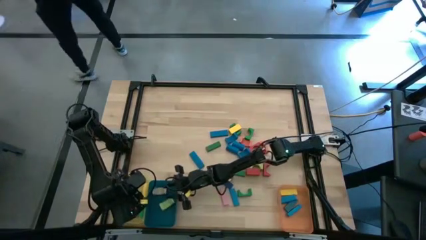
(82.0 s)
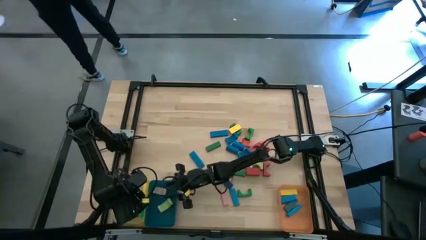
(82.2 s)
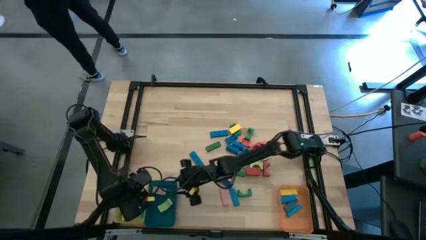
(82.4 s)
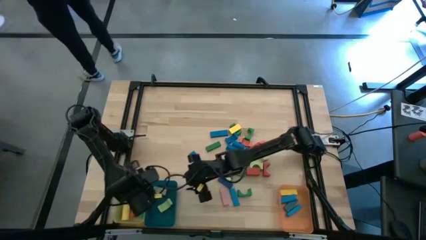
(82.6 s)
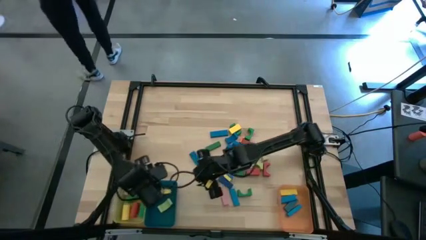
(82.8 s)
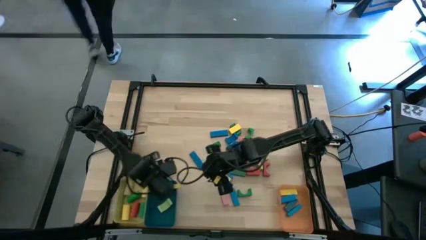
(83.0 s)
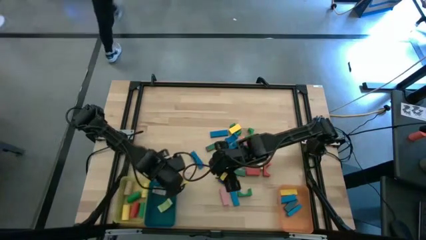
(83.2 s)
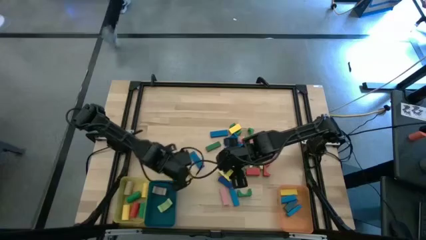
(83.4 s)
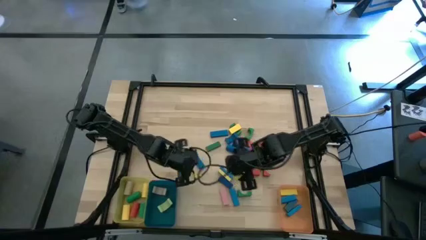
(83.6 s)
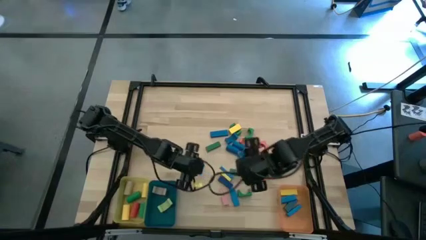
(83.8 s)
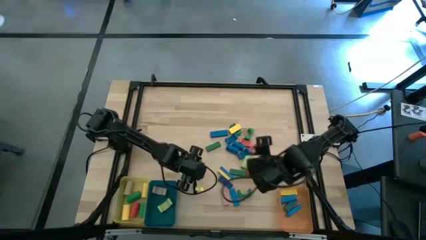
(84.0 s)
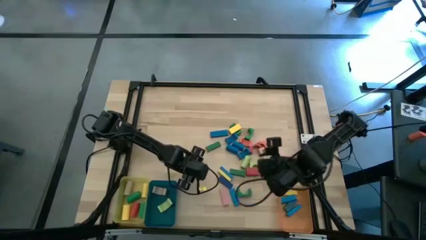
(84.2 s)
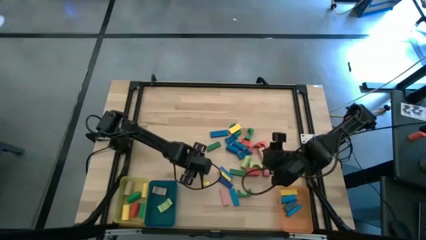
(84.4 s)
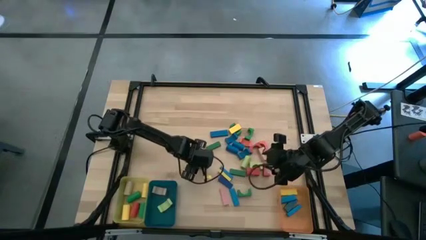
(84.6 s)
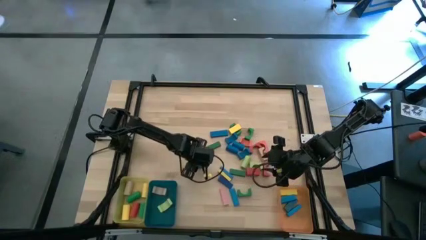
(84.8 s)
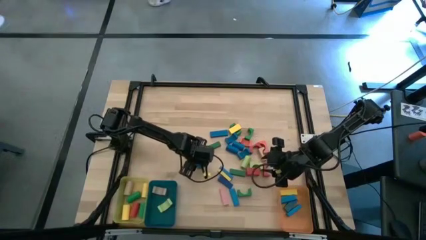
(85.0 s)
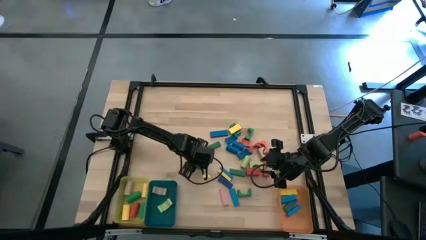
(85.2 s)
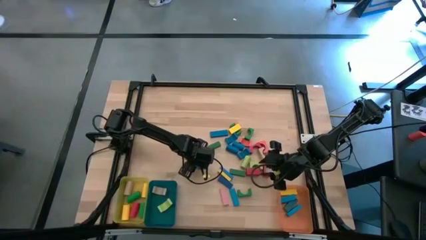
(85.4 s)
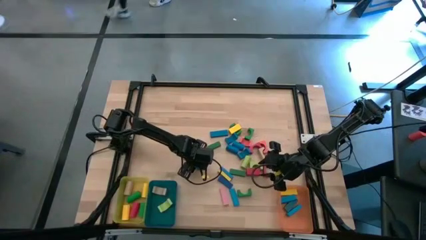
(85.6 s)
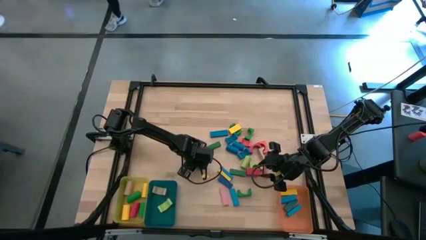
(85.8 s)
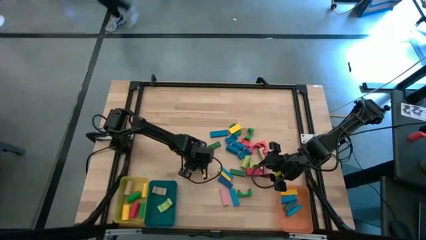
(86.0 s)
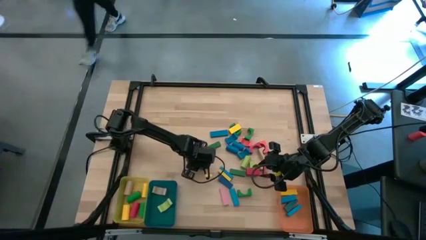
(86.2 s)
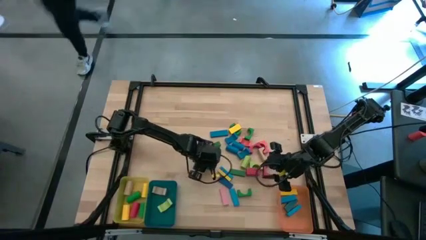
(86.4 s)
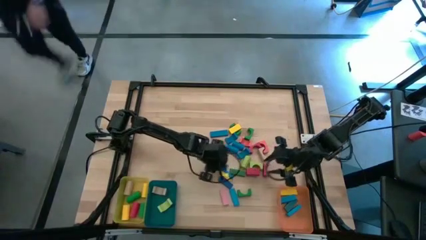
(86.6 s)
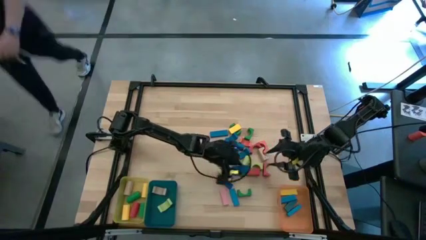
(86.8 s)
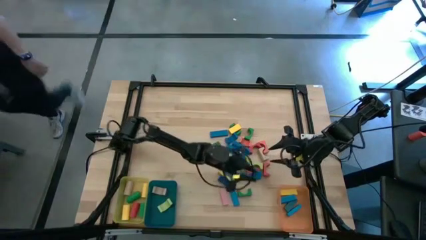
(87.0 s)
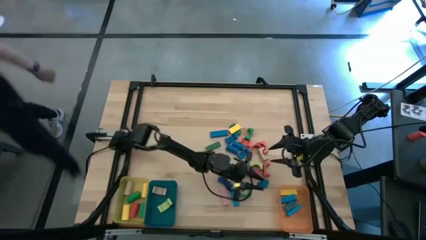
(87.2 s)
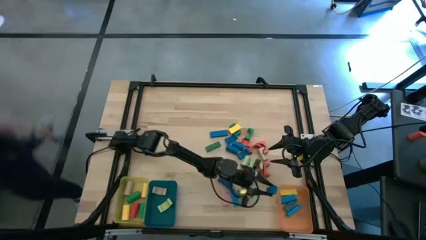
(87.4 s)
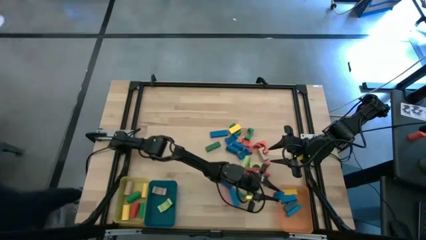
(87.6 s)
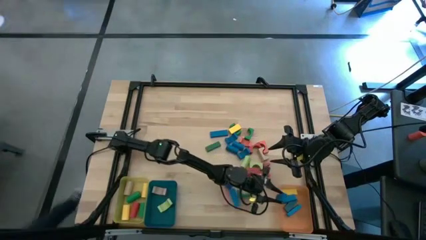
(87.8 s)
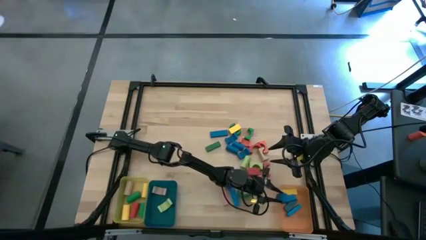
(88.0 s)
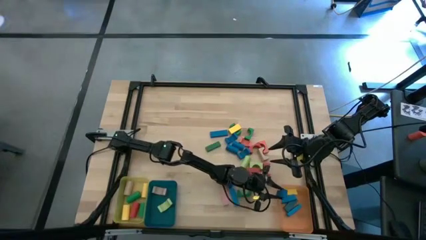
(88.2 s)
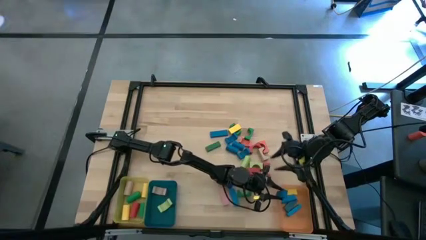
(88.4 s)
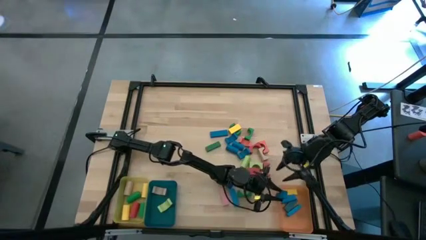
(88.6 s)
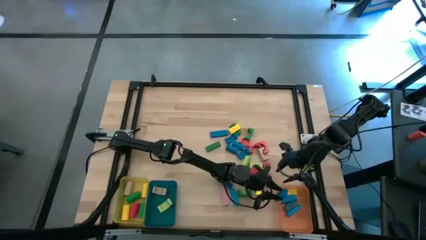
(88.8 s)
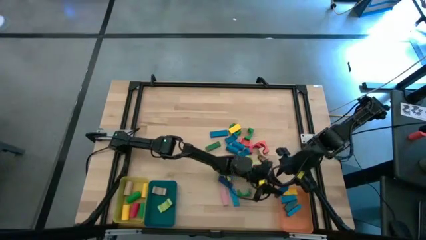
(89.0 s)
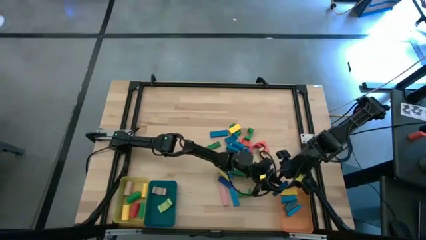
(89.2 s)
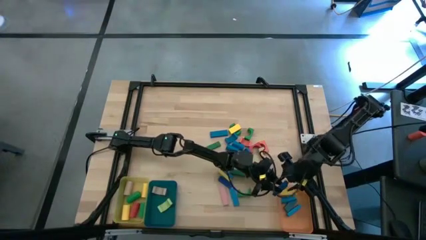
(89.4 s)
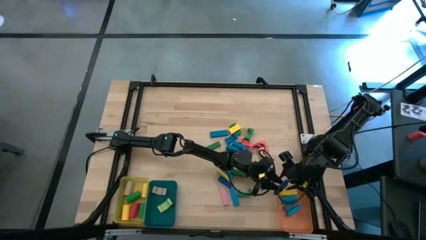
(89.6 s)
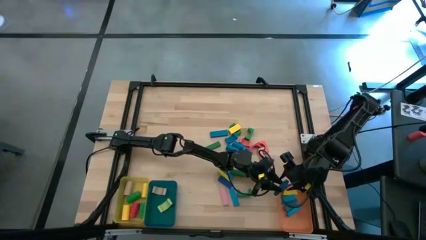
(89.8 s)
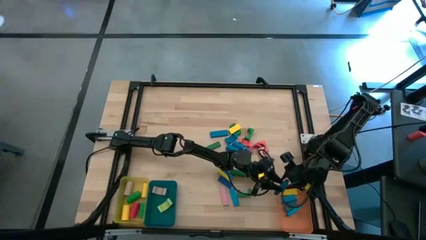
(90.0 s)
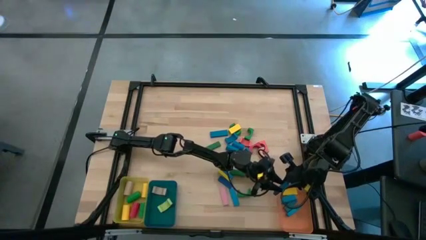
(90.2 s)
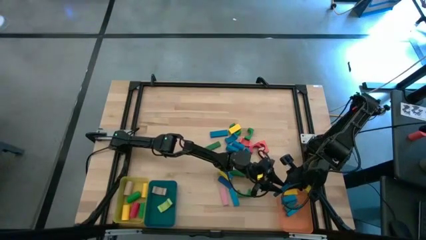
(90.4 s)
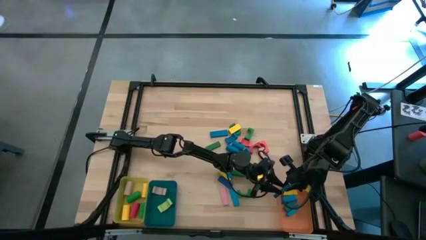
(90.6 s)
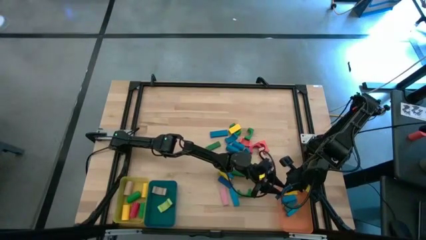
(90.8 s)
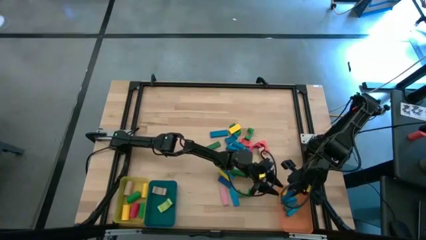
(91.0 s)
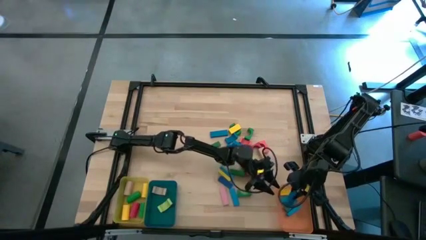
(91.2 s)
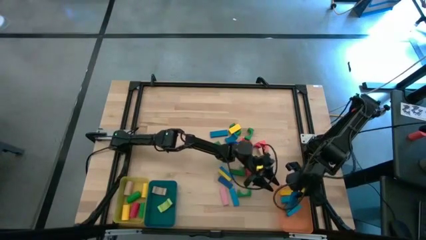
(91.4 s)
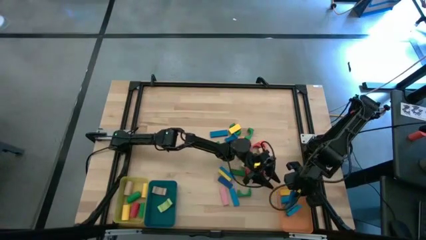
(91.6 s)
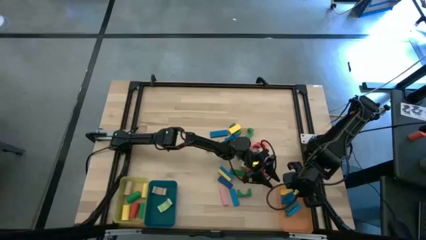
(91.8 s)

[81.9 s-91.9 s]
Task: Sort blocks by size
Put the blue rectangular block into the orange bin

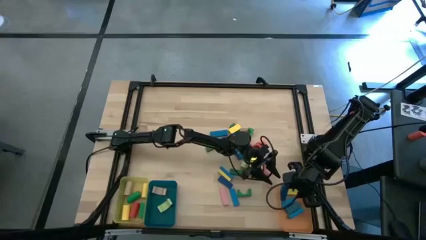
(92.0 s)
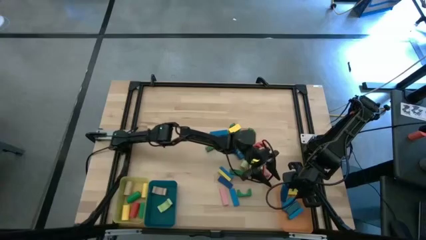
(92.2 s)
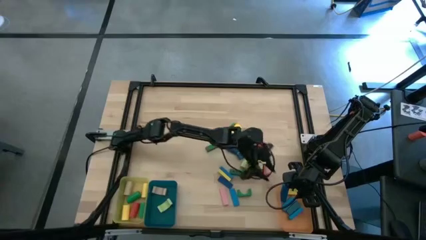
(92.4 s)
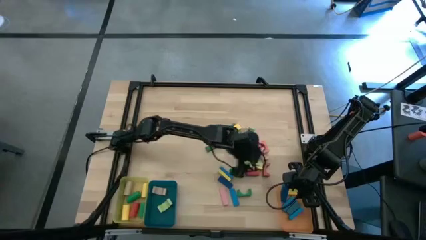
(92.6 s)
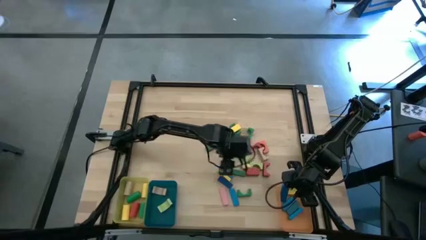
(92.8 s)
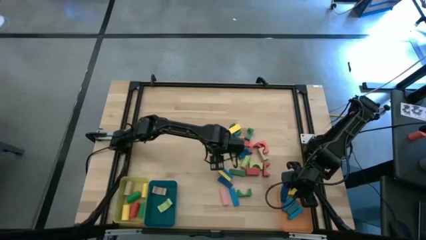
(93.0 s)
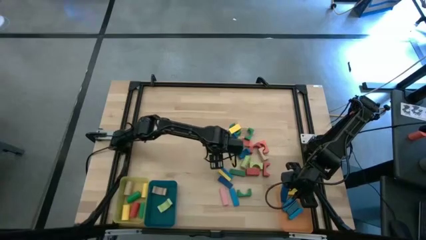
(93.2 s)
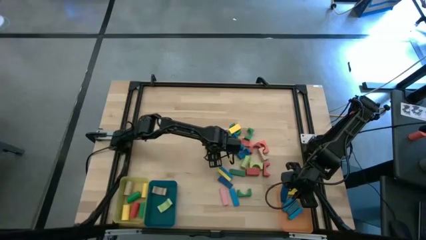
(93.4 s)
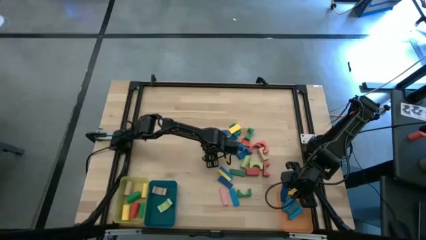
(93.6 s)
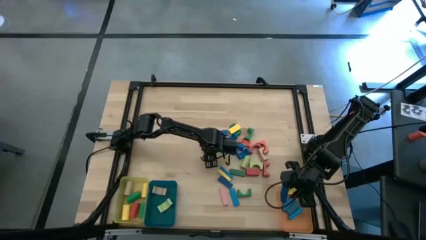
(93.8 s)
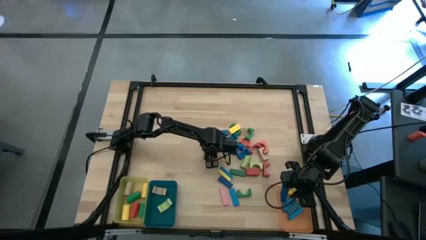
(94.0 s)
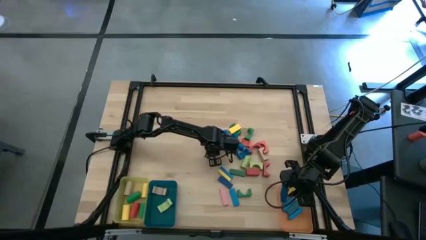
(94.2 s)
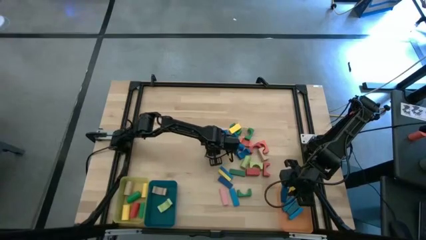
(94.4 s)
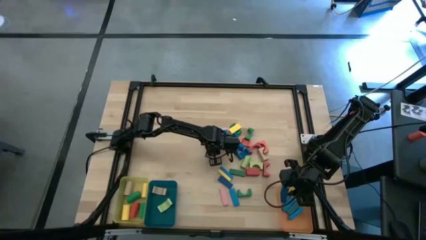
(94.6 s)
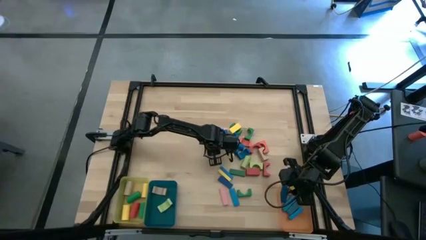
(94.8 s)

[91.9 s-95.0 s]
Put the green rectangular block into the orange bin

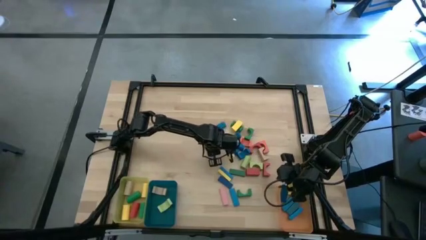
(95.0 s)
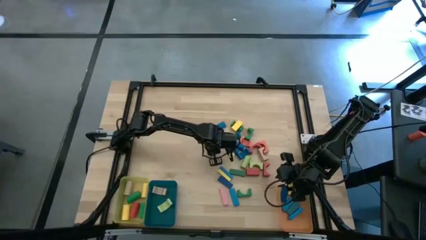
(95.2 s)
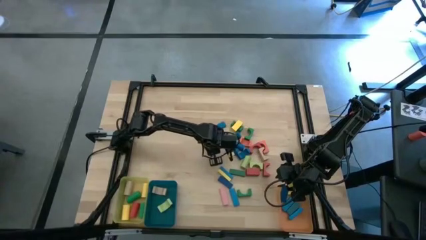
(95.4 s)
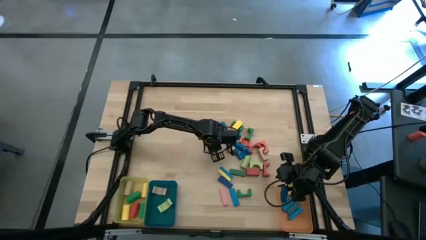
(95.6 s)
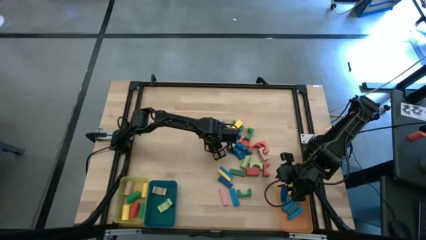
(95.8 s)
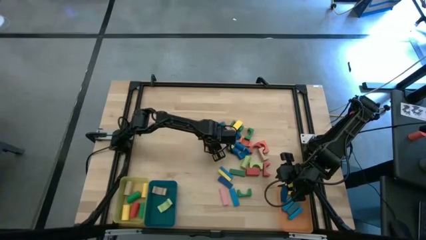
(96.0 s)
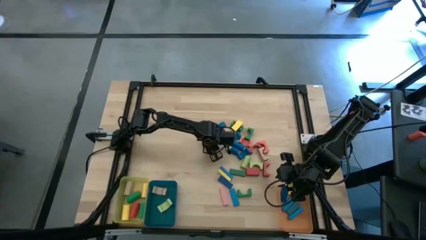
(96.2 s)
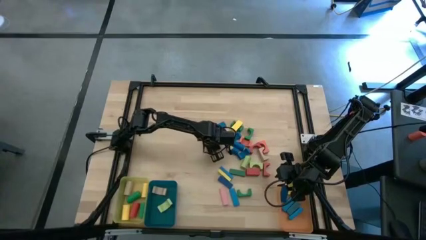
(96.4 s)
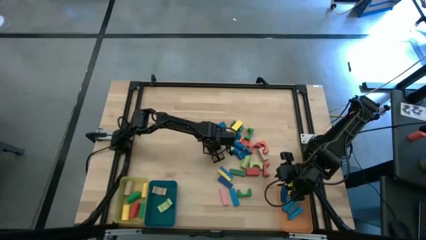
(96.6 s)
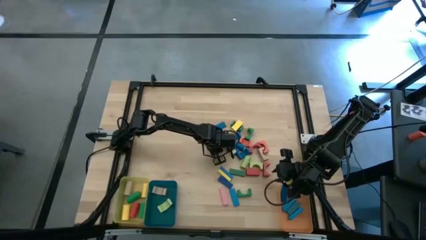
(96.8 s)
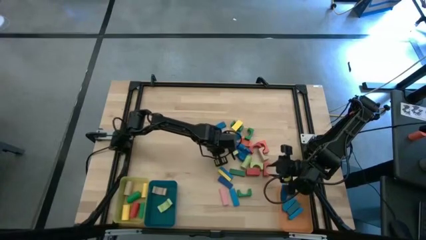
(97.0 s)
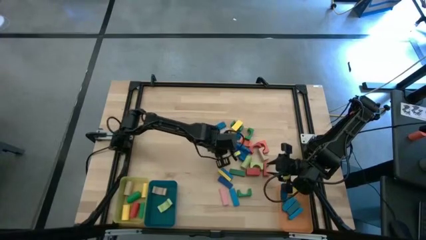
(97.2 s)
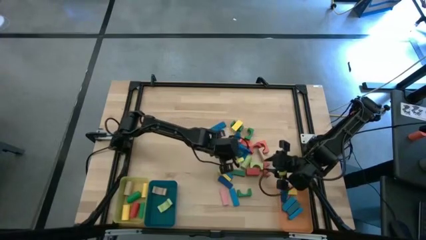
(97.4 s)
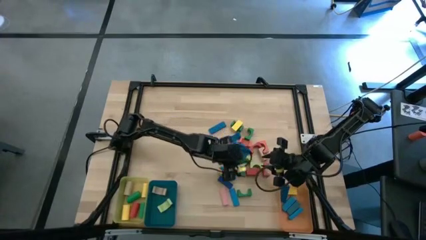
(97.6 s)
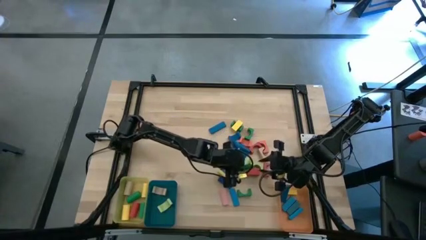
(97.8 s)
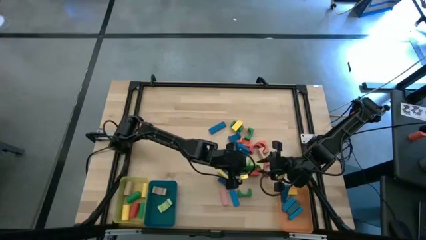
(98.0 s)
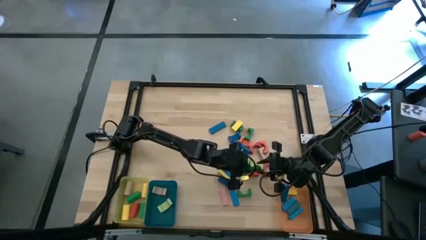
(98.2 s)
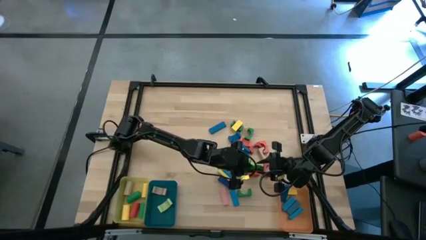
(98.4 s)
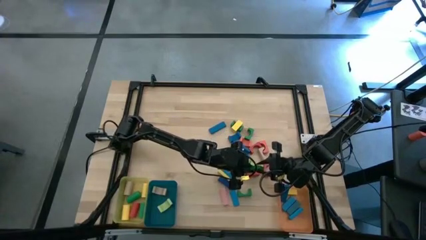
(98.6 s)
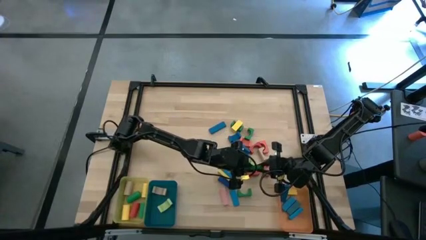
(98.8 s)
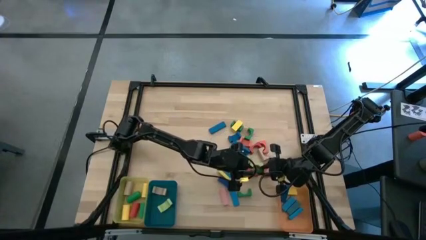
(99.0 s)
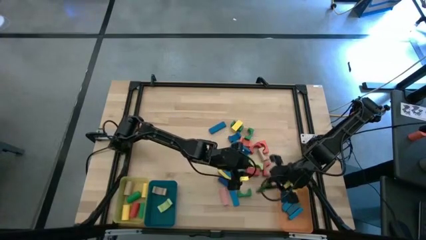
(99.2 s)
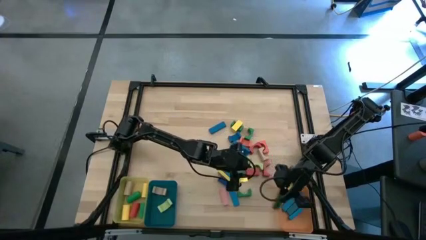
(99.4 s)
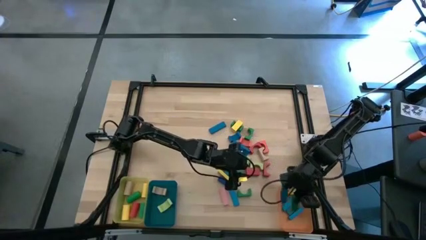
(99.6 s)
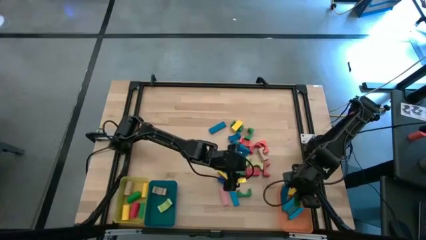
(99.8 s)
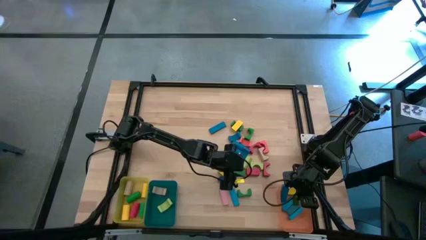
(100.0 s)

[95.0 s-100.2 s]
Put the green rectangular block into the orange bin
